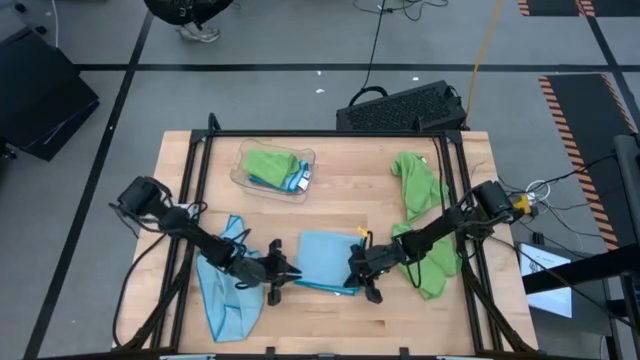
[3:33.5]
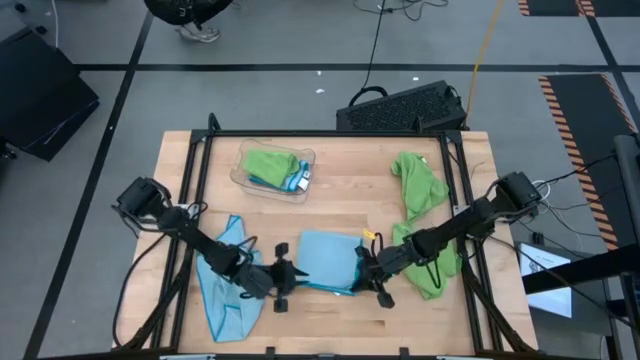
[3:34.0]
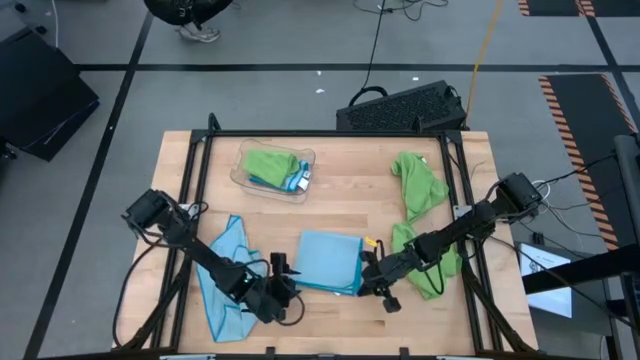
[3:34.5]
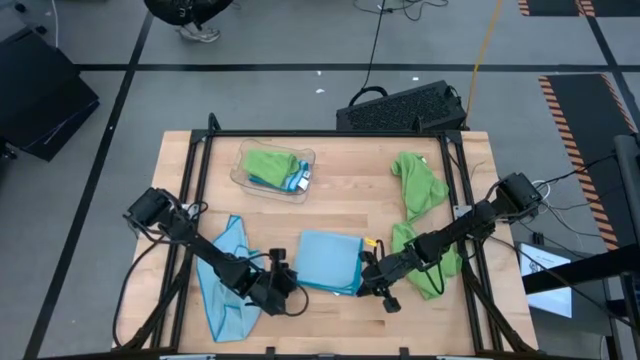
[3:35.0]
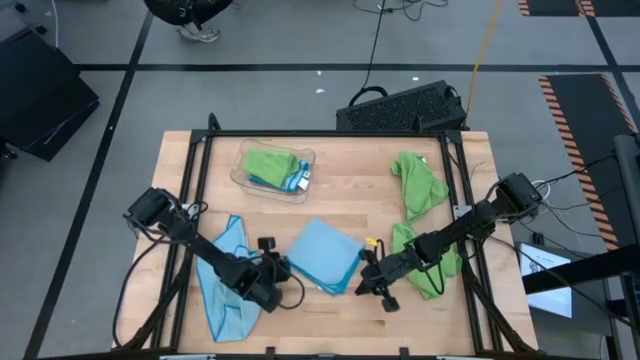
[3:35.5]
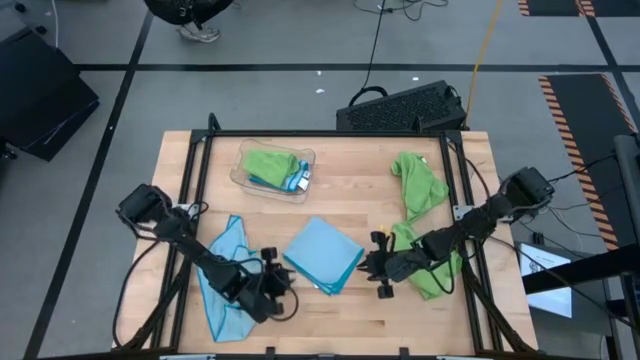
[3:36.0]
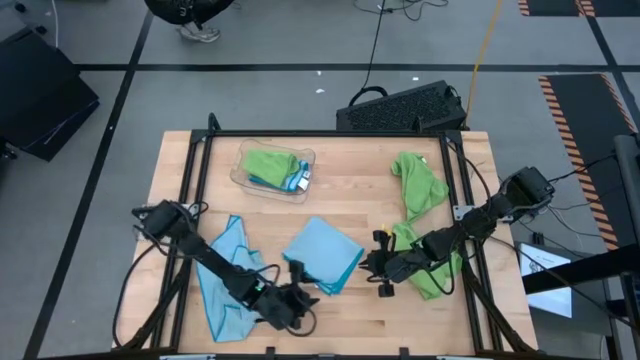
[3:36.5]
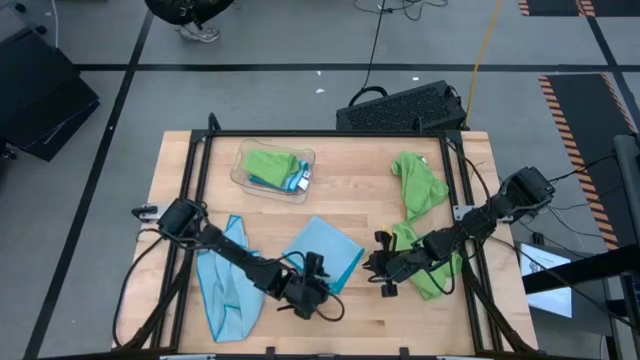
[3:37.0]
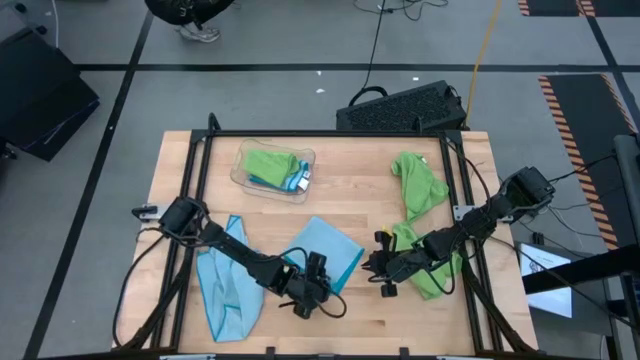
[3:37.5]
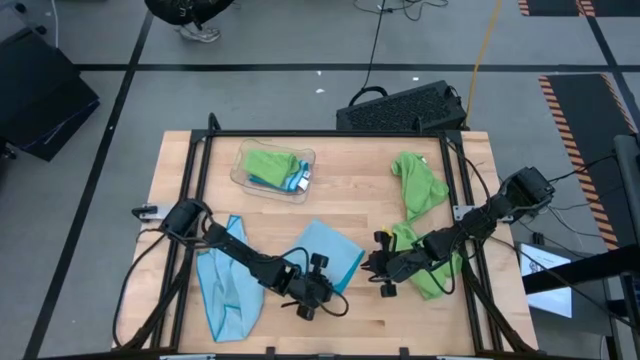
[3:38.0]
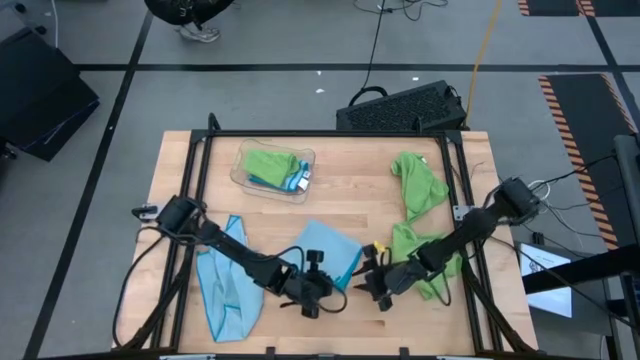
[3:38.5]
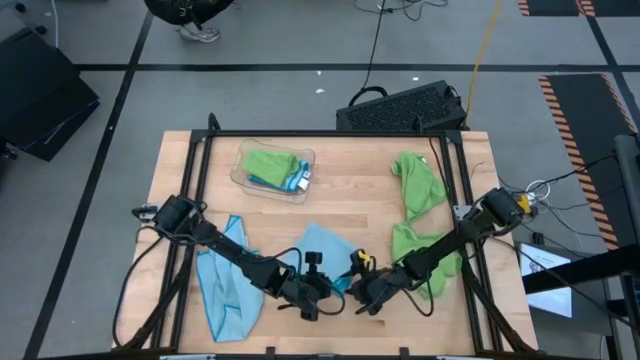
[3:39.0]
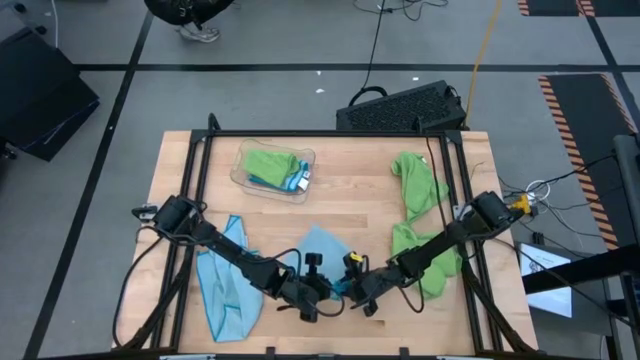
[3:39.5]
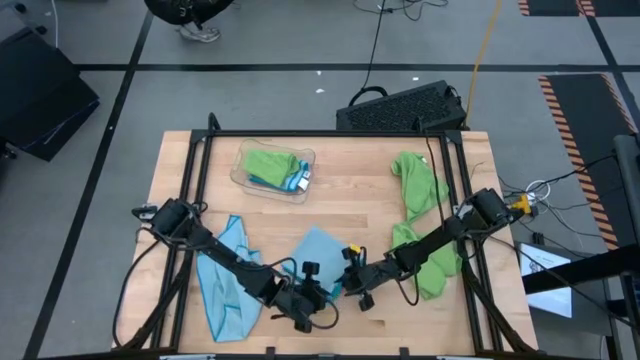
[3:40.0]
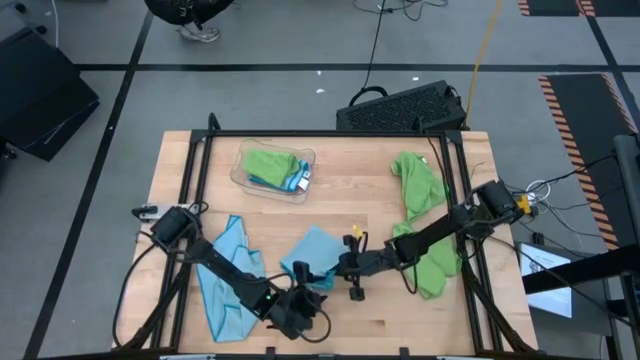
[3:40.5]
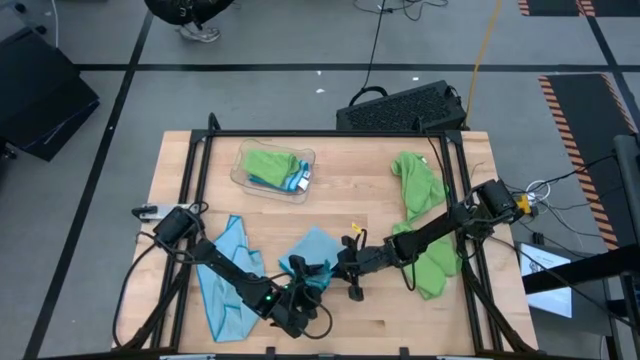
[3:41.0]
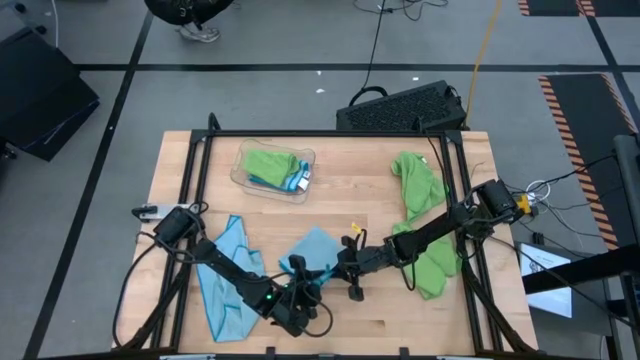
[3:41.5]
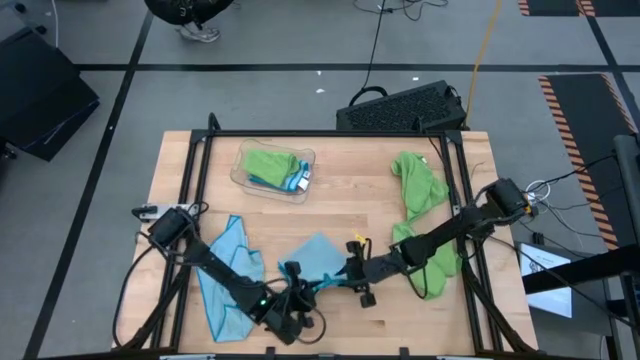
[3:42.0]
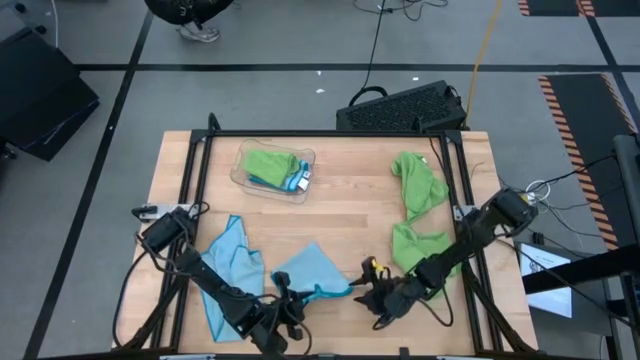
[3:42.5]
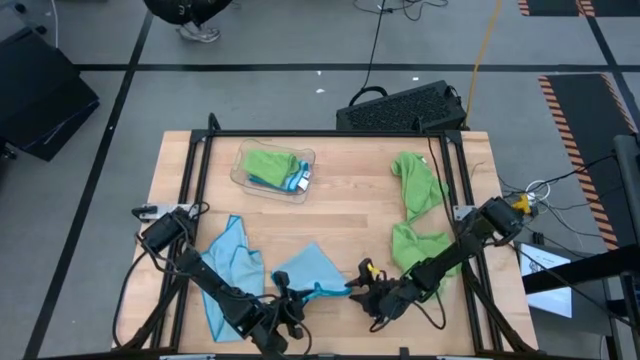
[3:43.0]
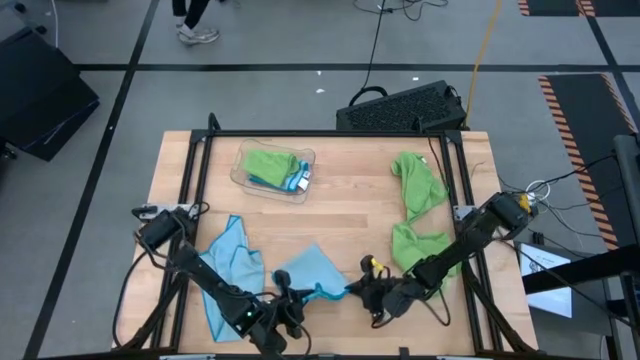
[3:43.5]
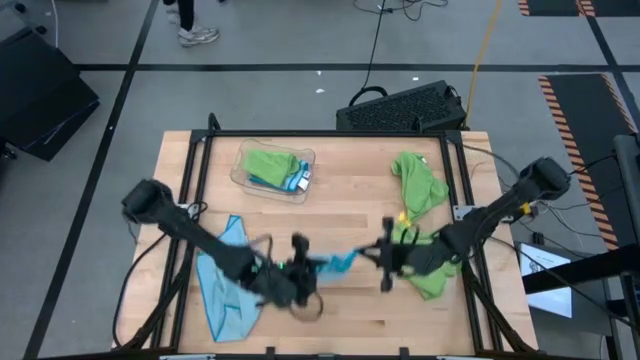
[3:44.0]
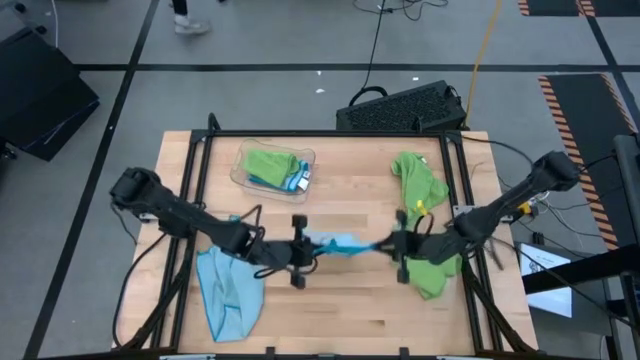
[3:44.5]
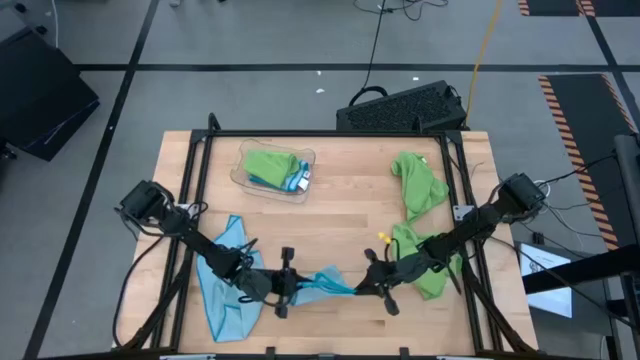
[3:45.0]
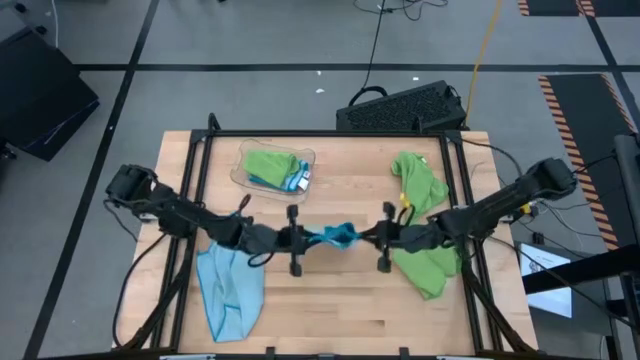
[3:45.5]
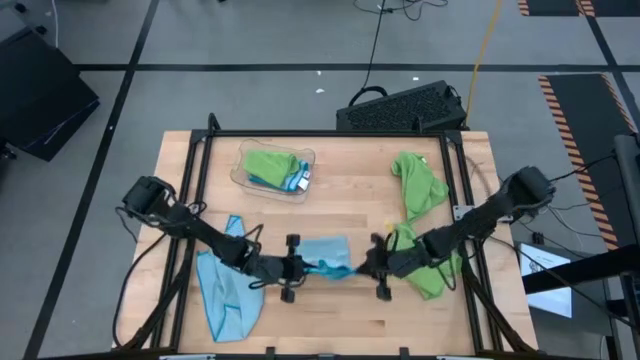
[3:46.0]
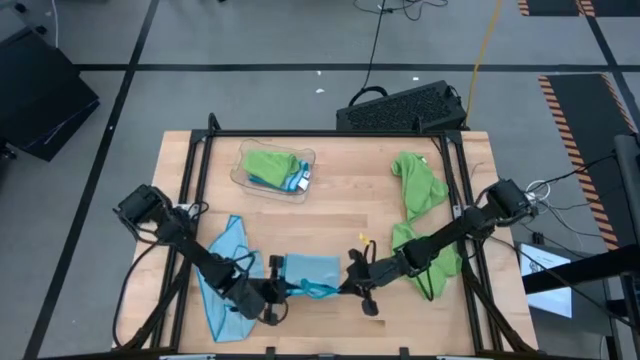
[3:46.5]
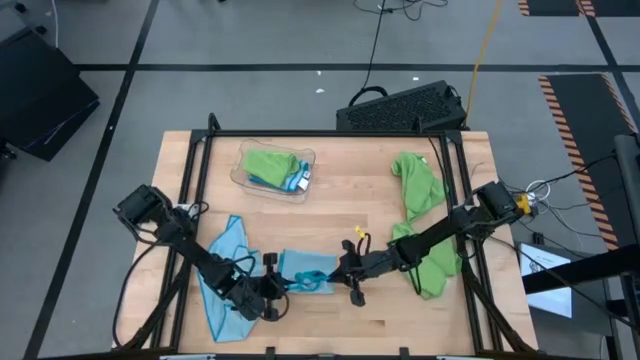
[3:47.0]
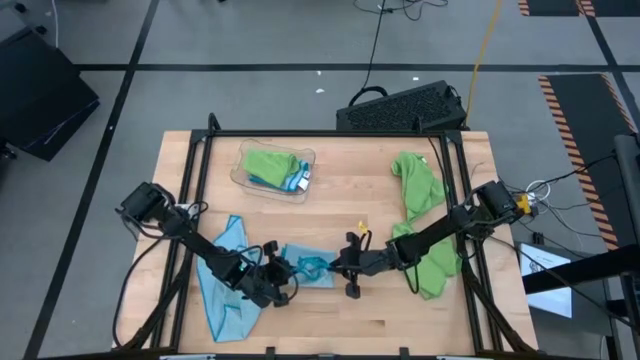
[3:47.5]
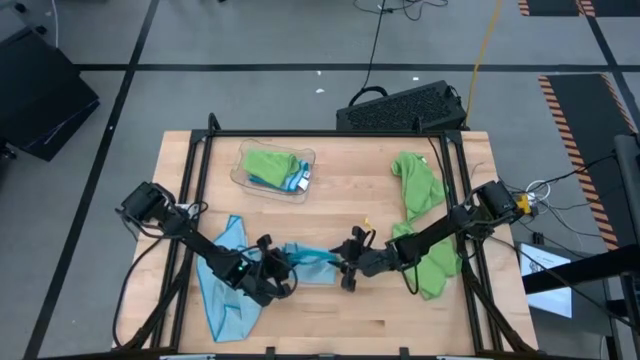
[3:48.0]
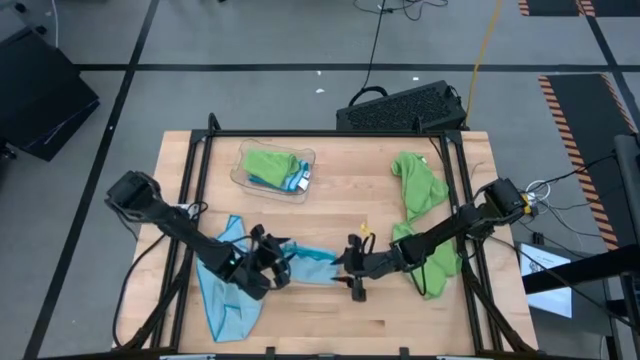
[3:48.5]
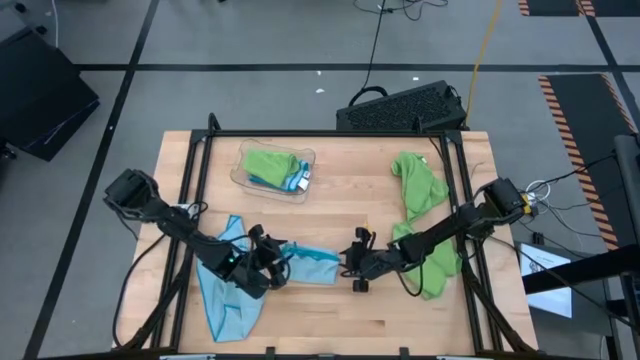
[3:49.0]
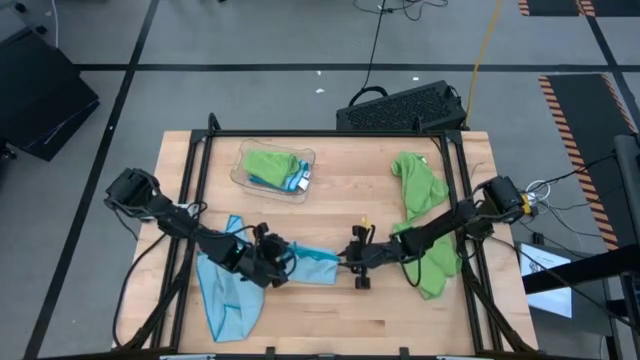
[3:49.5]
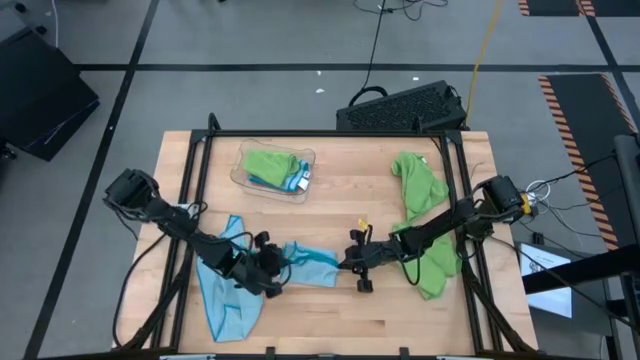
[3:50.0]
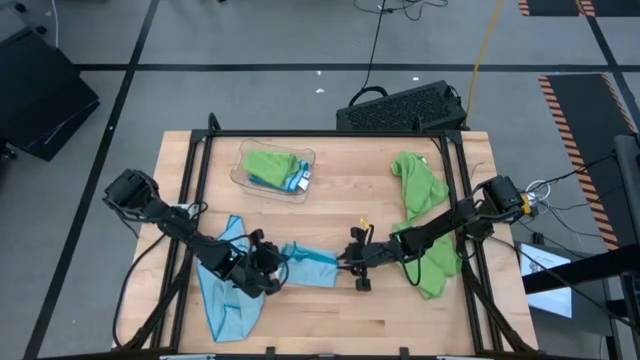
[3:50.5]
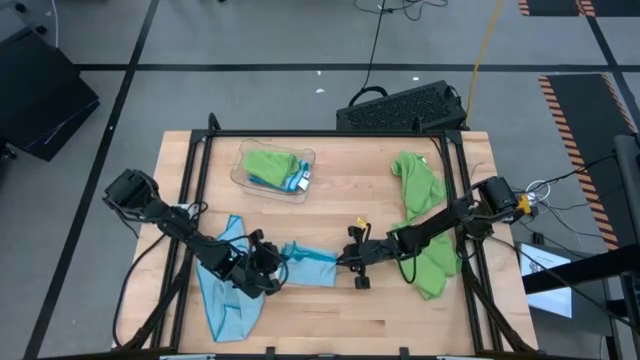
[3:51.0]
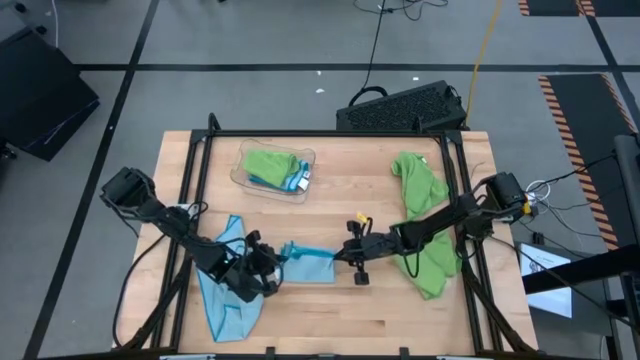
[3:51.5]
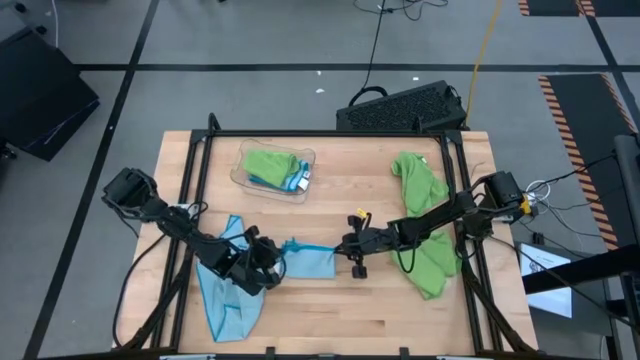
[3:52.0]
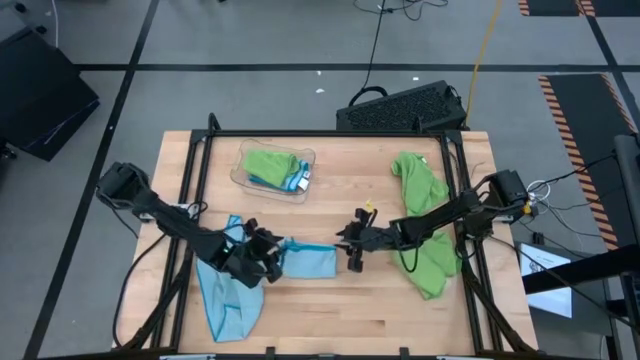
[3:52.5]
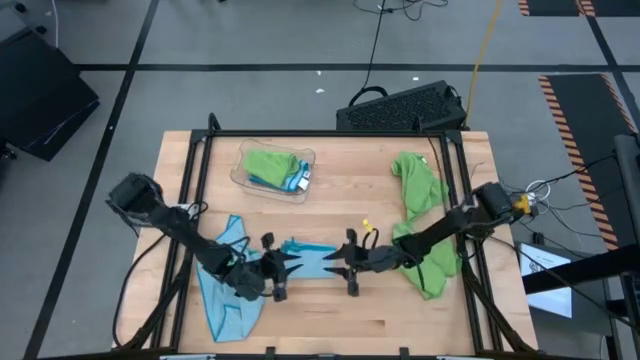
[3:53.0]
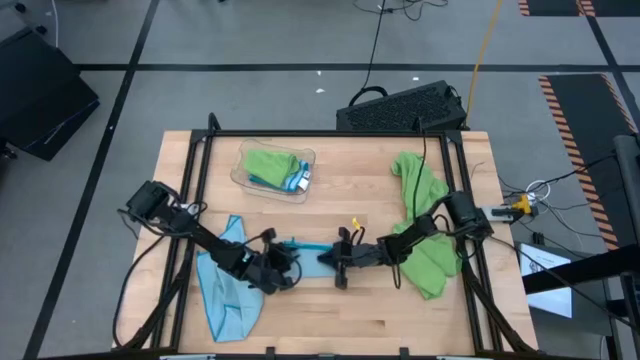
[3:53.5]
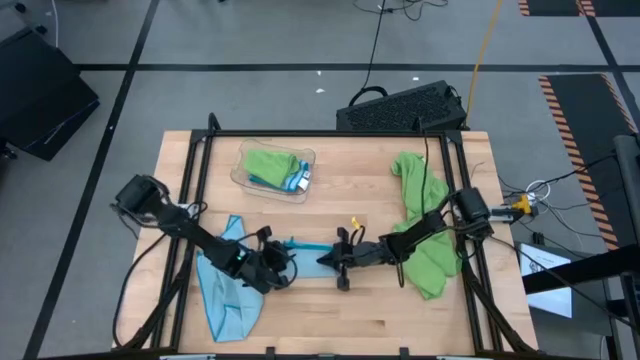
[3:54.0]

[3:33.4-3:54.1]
Task: Fold microfiber towels
Fold the right blue microfiber cloth
